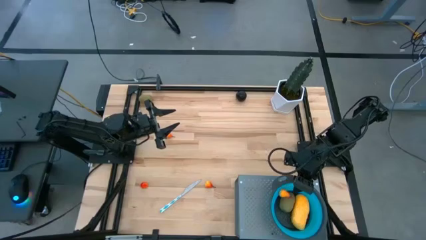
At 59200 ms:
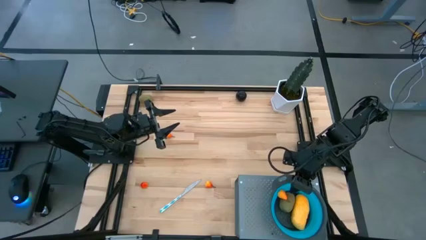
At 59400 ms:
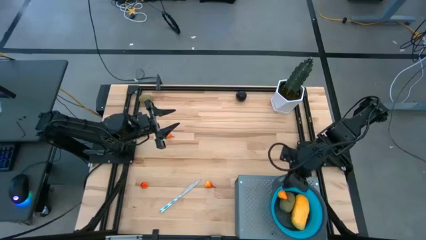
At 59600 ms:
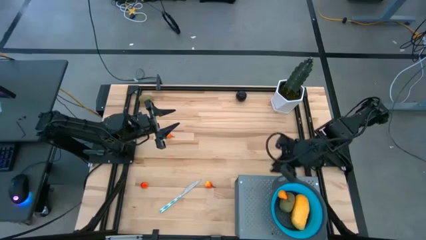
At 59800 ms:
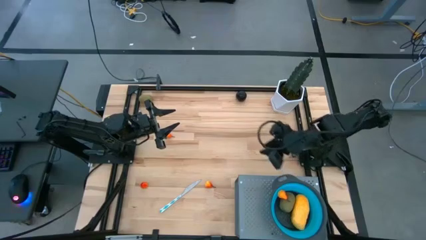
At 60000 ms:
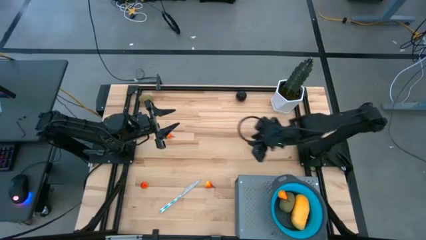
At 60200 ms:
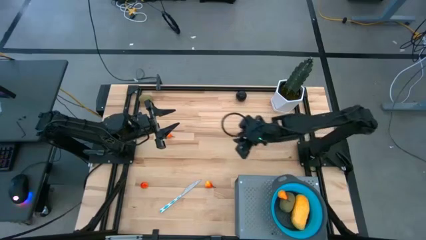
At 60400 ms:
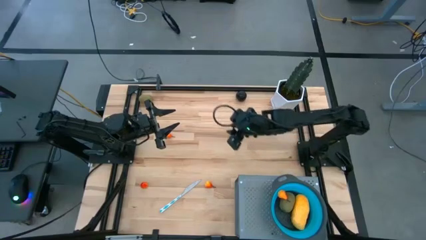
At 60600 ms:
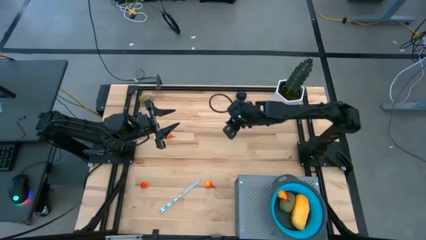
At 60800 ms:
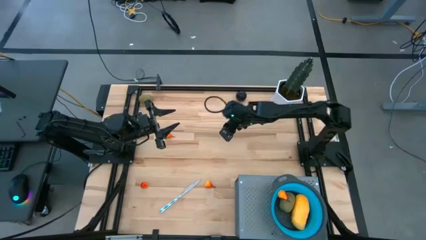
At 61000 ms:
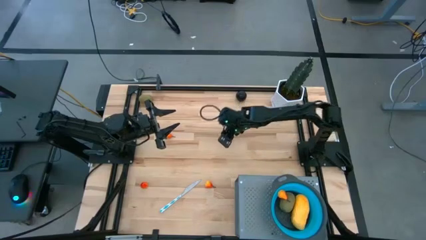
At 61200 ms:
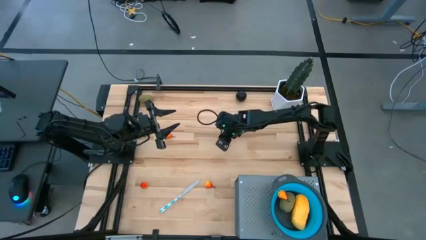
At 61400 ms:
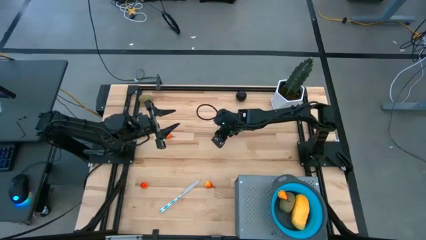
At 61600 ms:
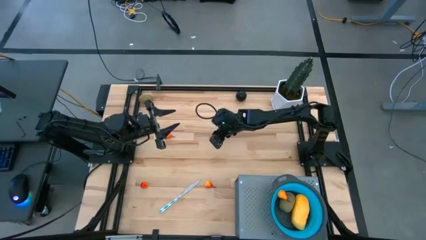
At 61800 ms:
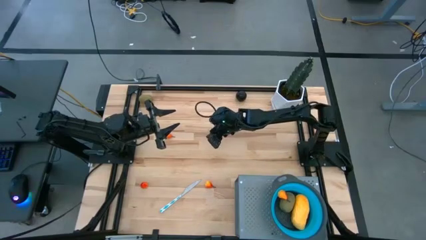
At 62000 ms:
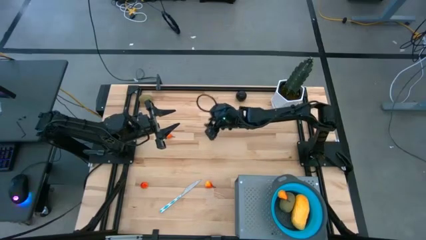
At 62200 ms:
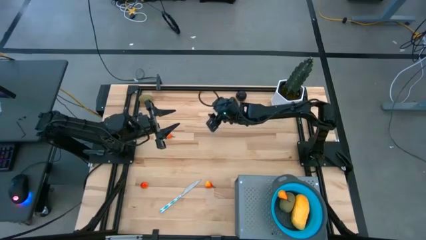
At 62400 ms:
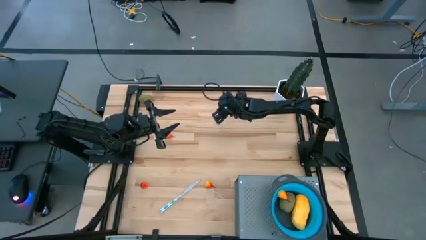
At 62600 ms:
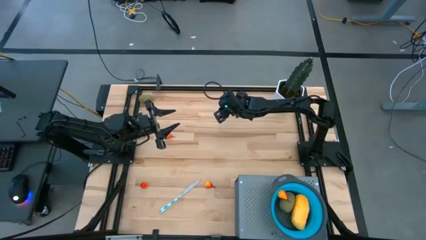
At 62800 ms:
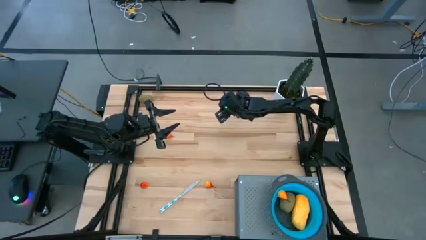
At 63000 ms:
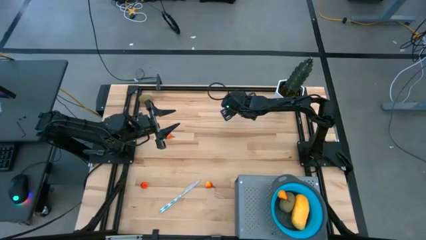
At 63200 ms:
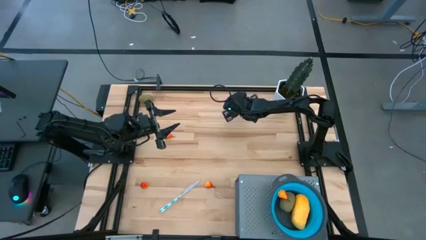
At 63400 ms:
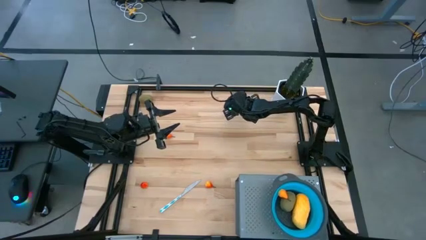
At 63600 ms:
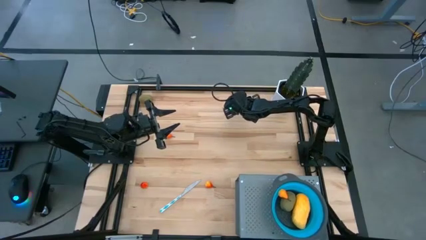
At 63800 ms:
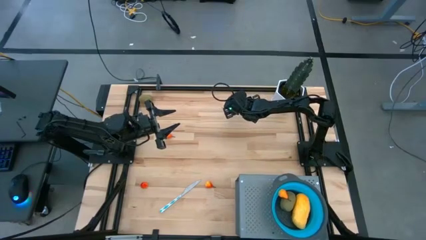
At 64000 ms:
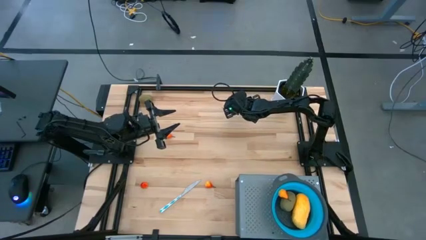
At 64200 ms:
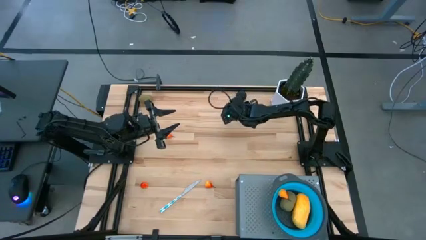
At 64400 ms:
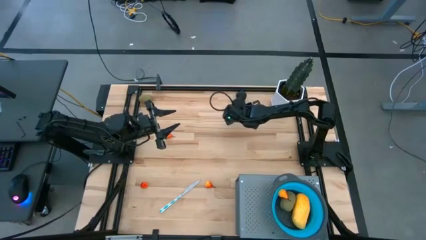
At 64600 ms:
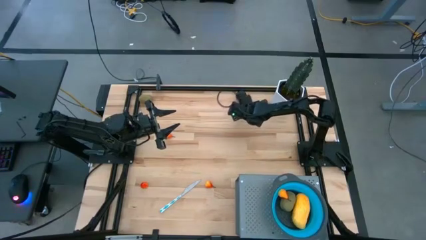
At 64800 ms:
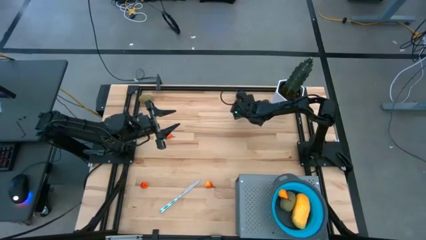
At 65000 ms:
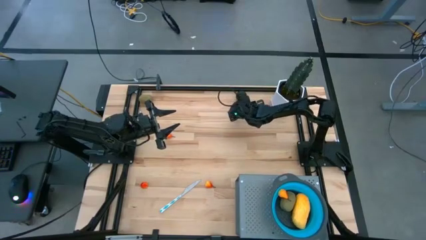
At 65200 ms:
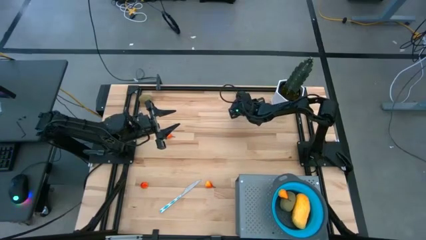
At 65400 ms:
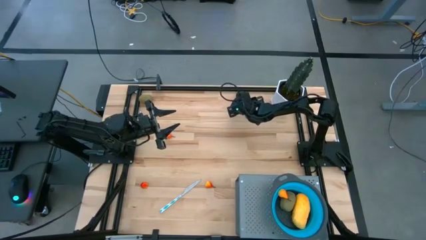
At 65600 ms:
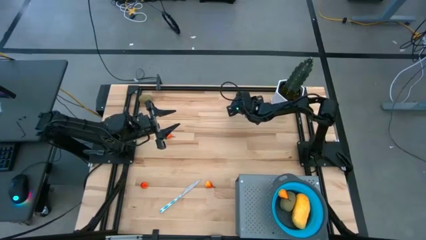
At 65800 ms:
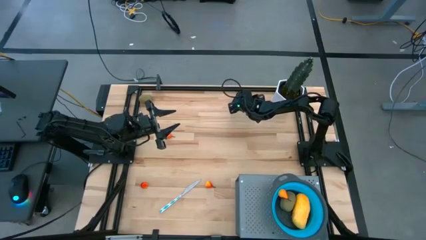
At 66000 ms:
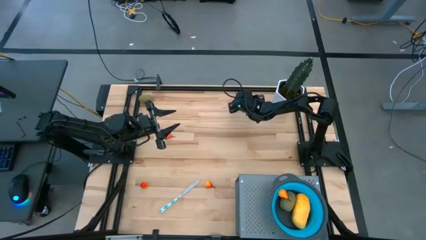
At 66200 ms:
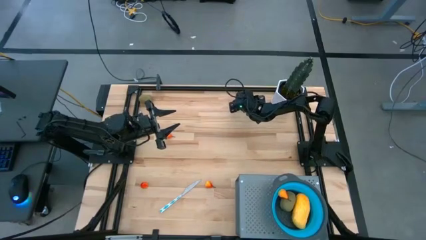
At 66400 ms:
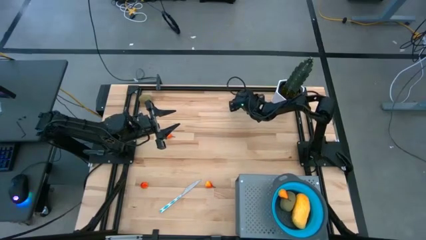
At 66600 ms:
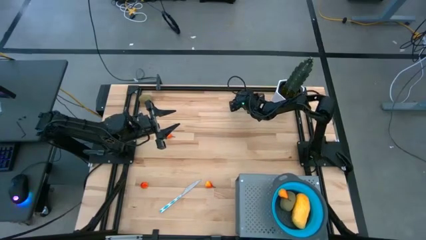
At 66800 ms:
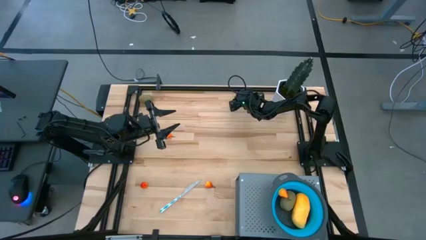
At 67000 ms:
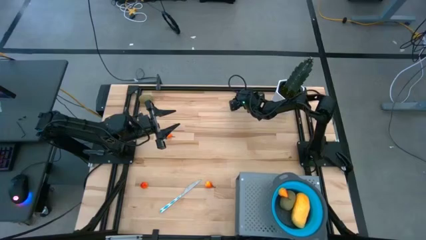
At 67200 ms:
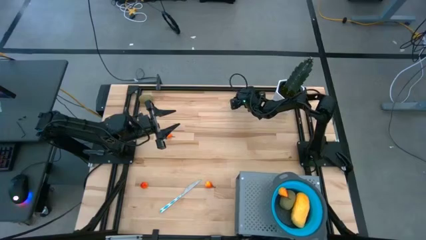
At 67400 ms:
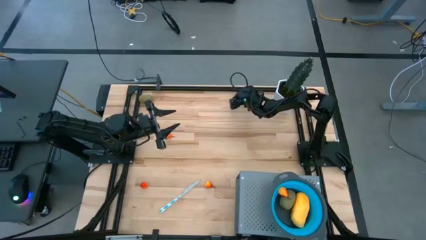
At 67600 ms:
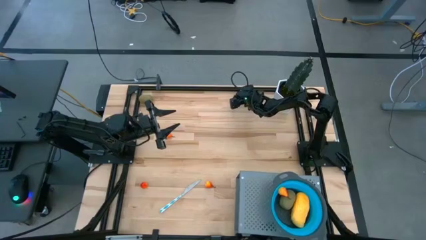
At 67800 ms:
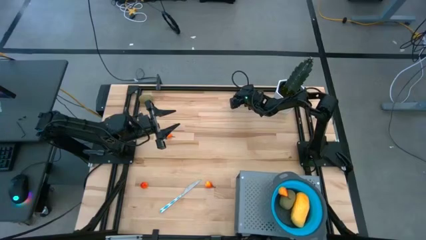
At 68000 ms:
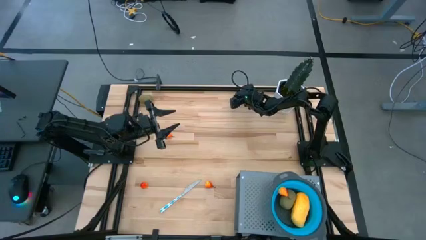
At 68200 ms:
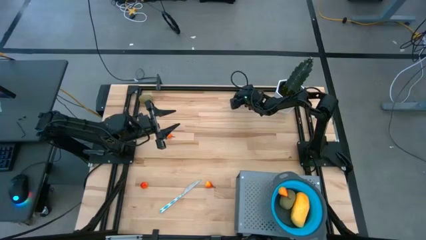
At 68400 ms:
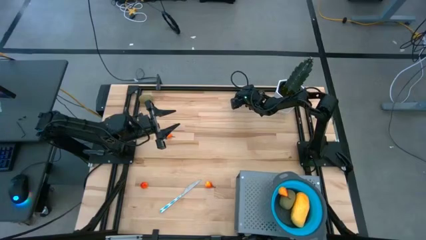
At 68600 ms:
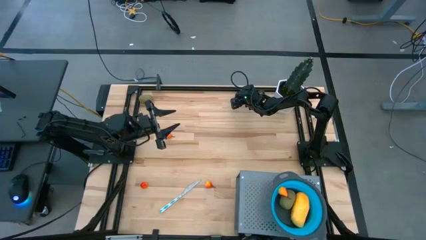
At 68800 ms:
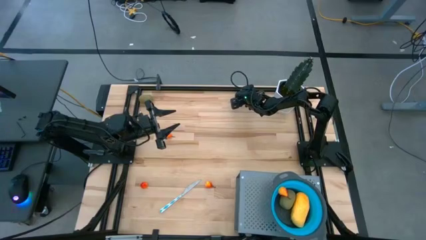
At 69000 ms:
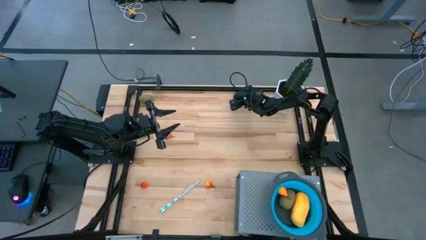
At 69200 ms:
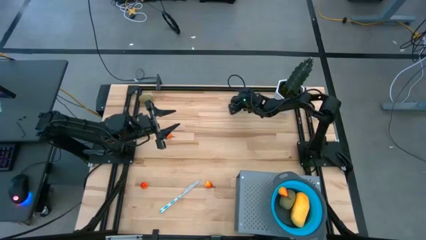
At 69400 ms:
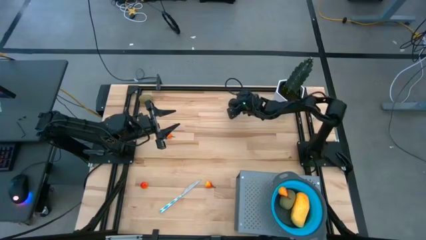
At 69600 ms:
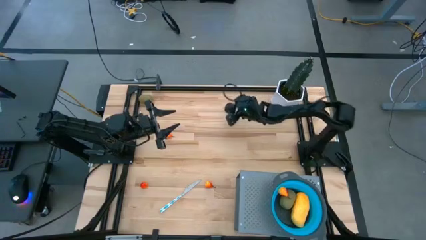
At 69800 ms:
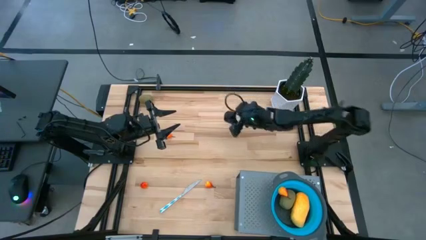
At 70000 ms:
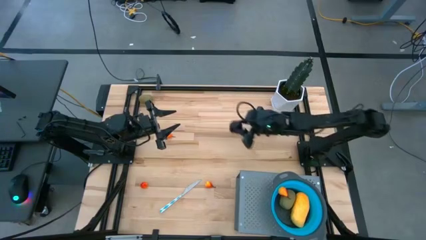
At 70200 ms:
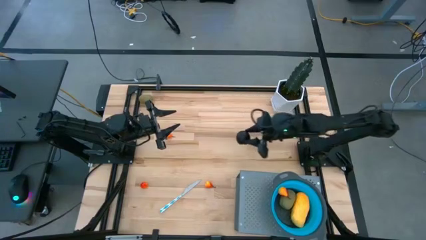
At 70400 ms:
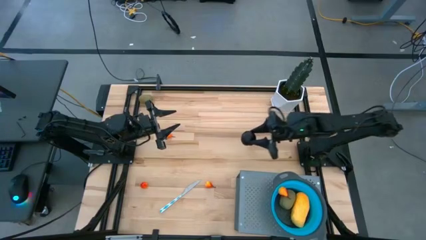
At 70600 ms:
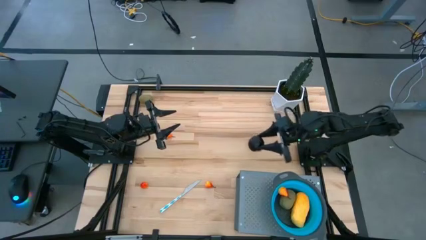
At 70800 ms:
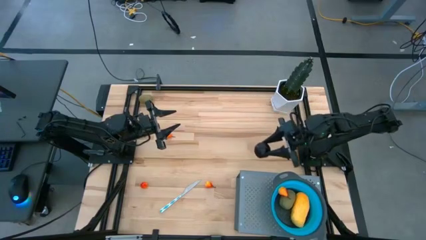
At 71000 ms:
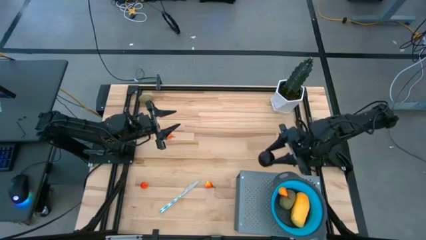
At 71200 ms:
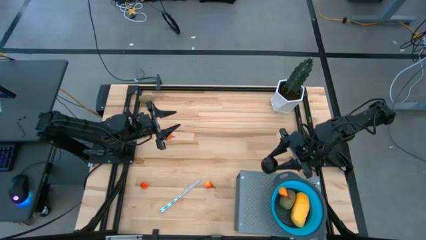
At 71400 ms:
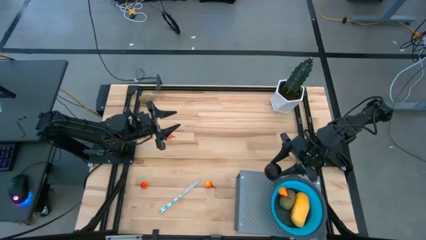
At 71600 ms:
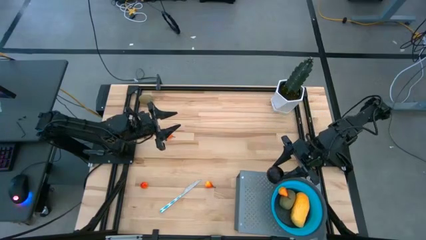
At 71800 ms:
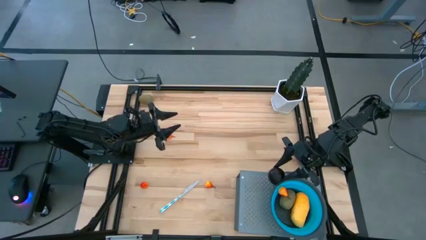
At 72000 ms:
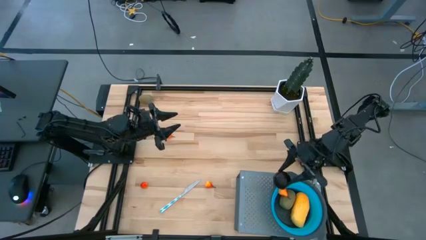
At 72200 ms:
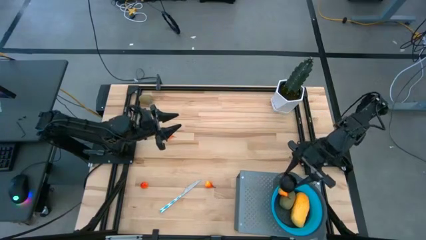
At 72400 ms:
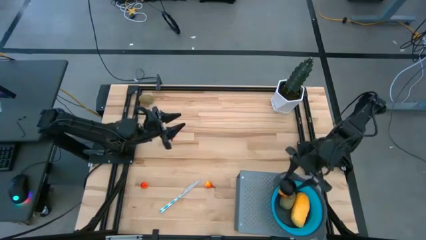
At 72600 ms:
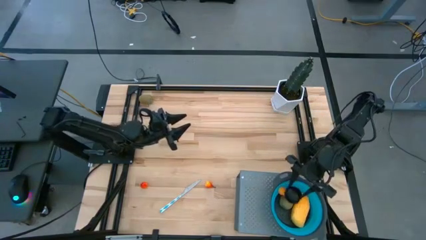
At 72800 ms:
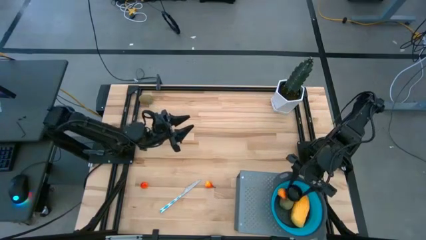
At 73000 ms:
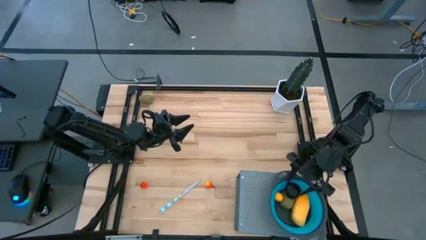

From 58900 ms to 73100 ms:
Task: Pick & Place Fruit
Put the black plum into the blue strainer bowl on the shelf

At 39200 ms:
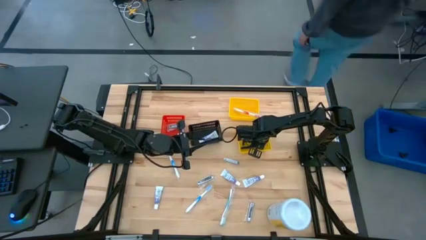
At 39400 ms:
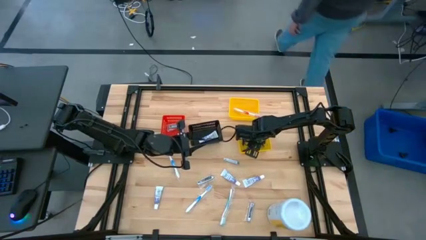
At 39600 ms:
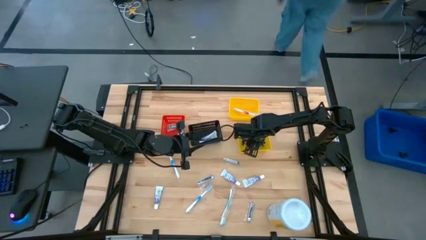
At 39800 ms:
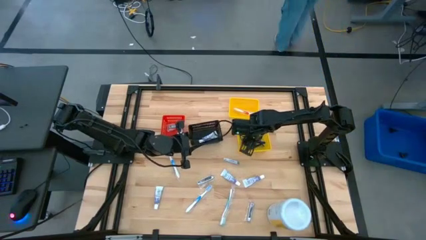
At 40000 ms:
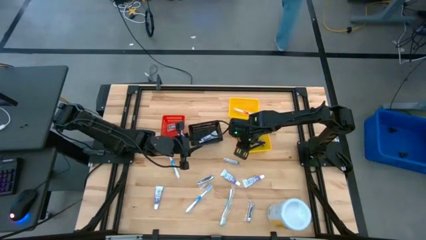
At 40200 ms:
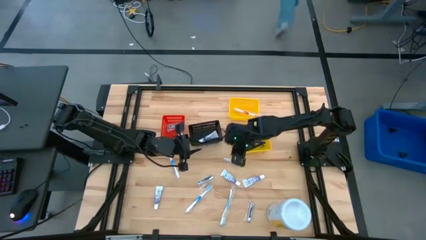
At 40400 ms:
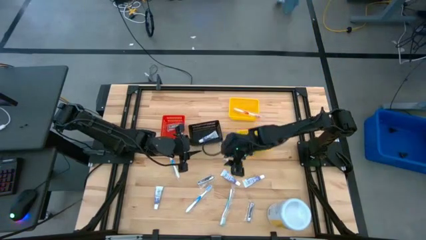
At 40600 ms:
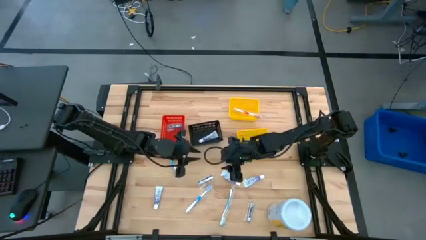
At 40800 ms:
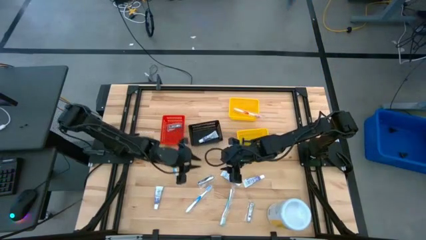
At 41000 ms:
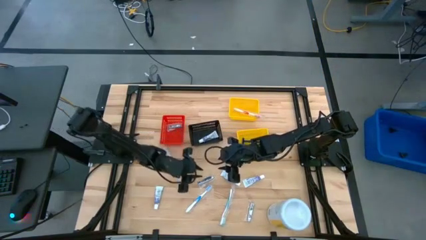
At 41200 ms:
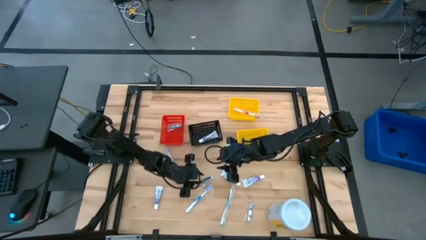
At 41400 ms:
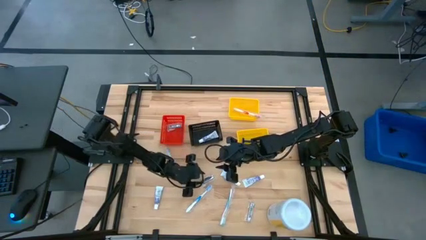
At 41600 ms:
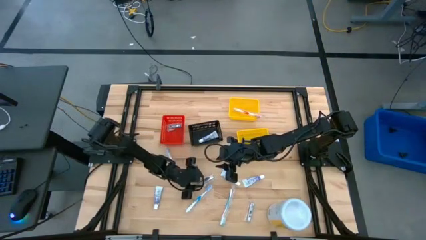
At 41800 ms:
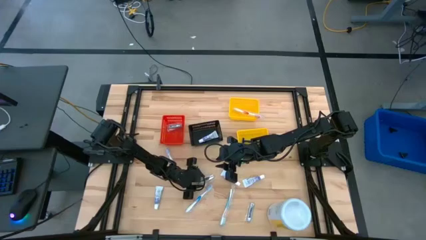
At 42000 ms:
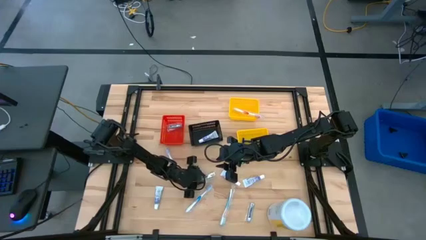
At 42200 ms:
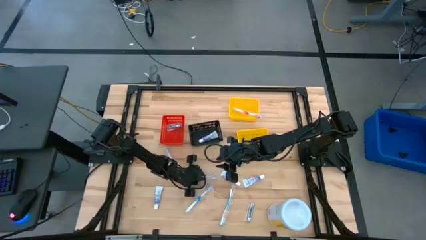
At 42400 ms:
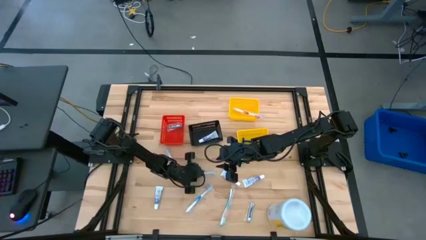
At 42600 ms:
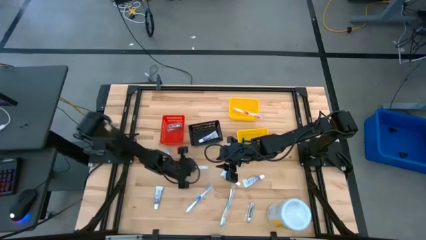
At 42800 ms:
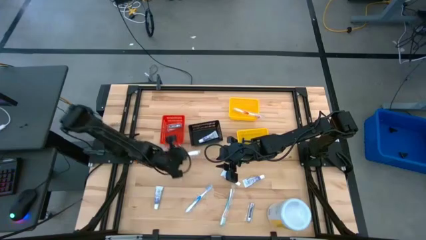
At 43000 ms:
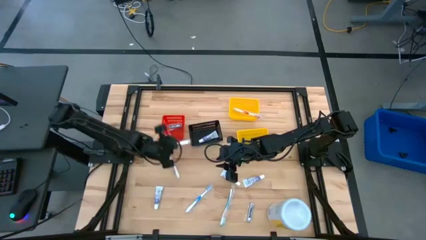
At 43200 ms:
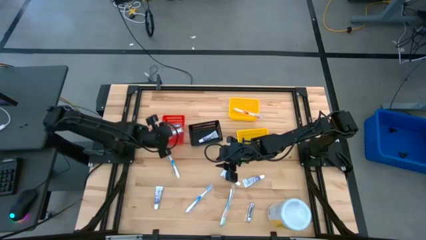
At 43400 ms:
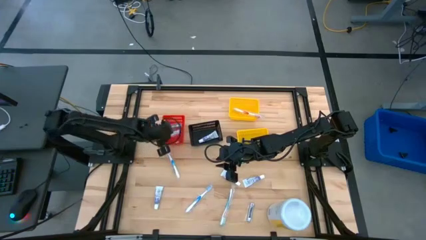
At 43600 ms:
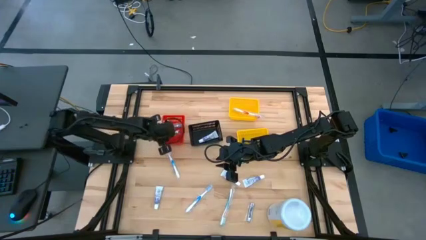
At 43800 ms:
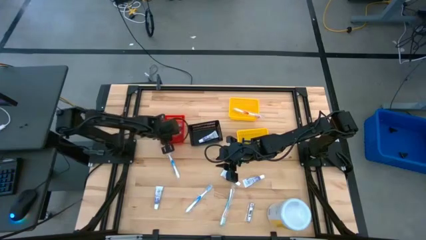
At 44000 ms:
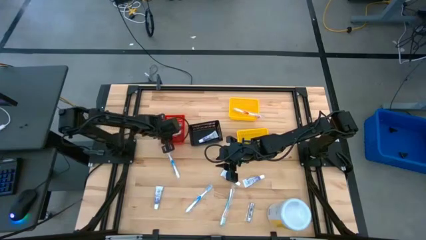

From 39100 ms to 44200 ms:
Task: Pick & Place Travel size toiletries
Put the silver nail cutter into the red bin
